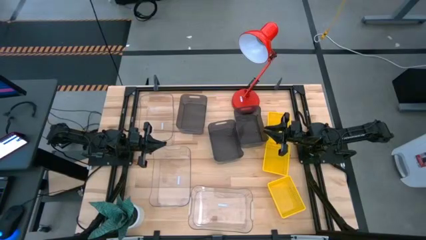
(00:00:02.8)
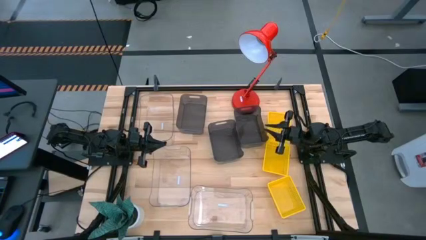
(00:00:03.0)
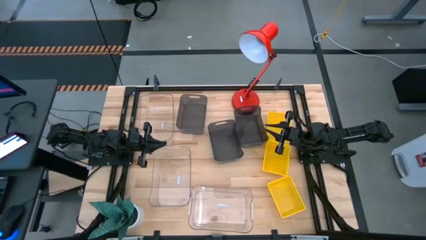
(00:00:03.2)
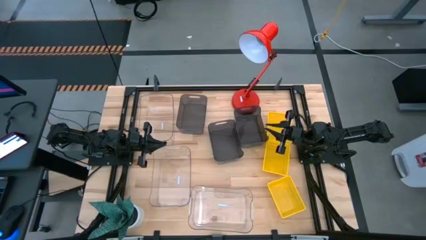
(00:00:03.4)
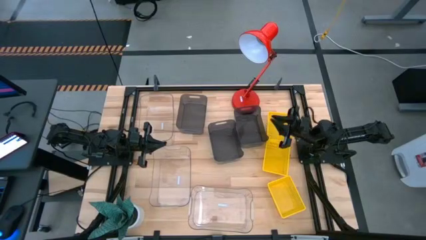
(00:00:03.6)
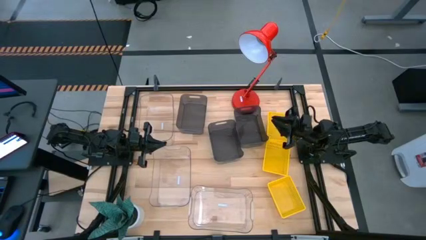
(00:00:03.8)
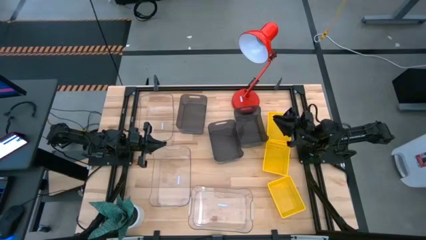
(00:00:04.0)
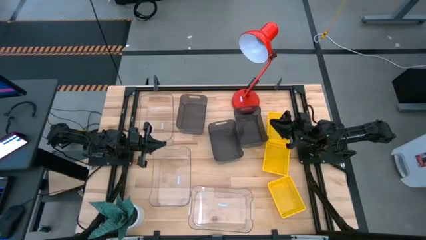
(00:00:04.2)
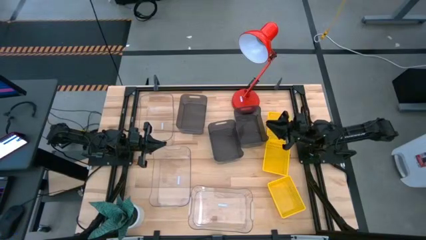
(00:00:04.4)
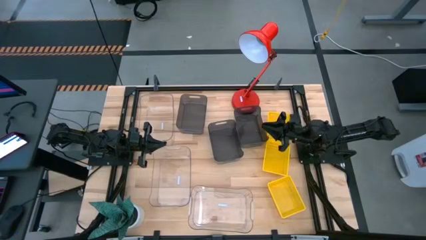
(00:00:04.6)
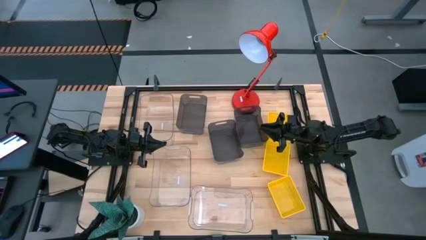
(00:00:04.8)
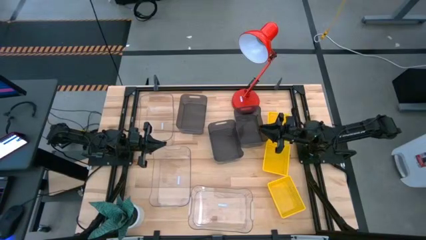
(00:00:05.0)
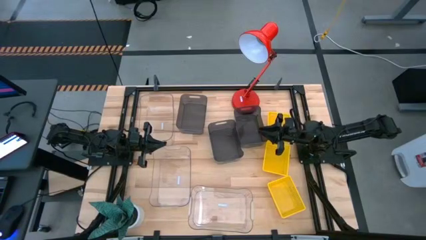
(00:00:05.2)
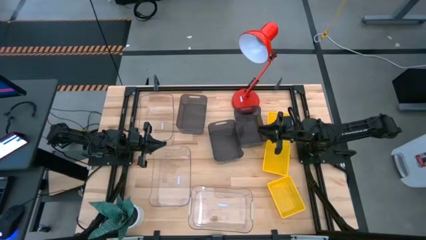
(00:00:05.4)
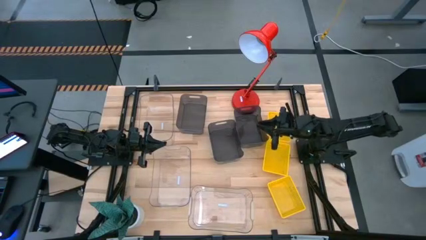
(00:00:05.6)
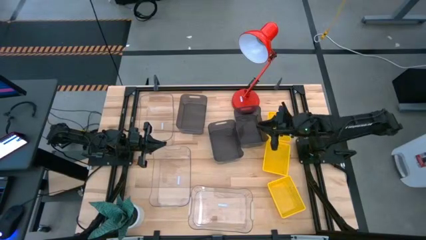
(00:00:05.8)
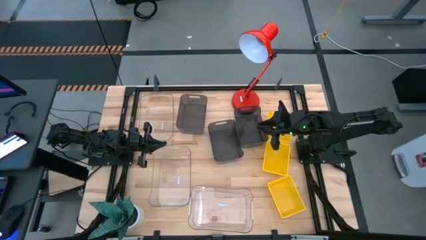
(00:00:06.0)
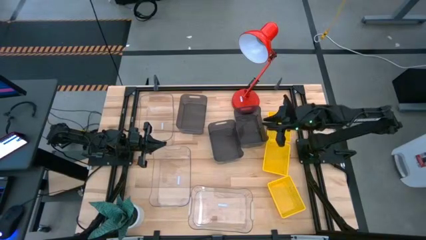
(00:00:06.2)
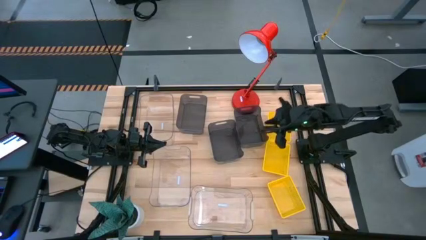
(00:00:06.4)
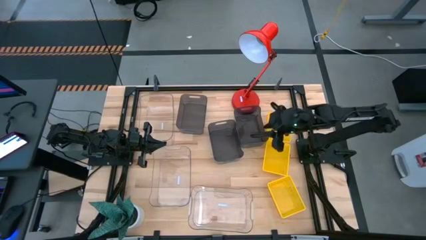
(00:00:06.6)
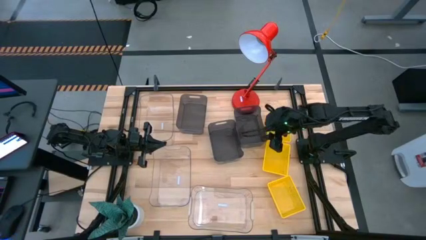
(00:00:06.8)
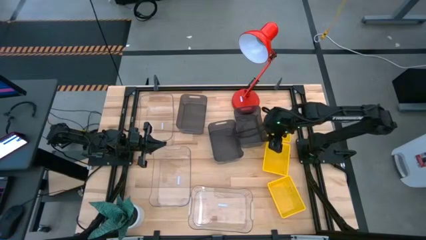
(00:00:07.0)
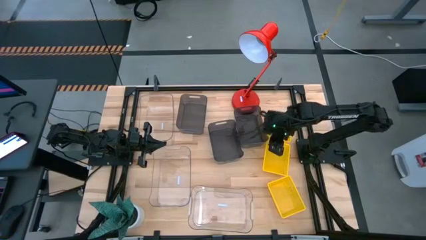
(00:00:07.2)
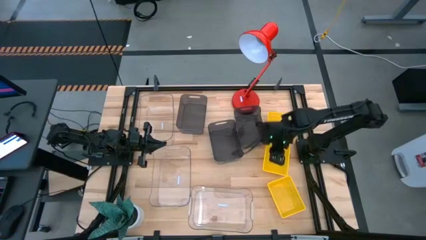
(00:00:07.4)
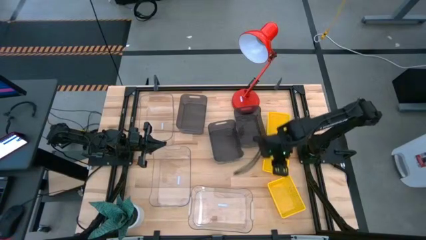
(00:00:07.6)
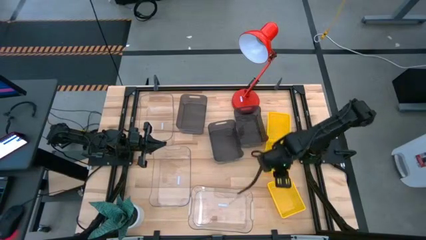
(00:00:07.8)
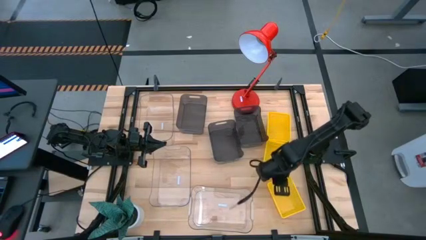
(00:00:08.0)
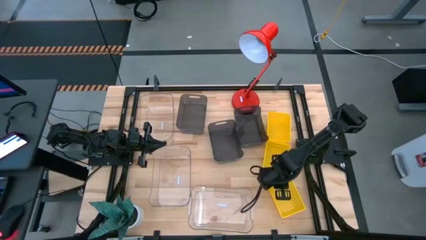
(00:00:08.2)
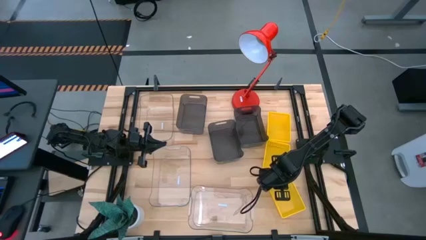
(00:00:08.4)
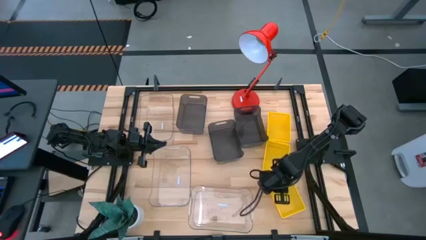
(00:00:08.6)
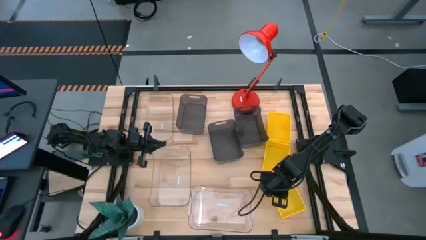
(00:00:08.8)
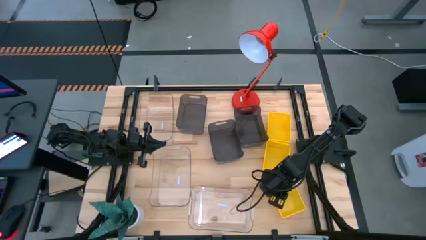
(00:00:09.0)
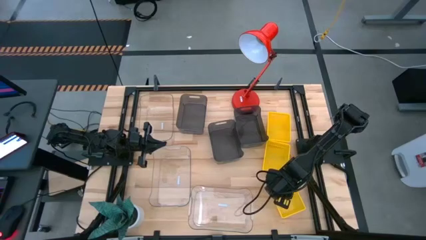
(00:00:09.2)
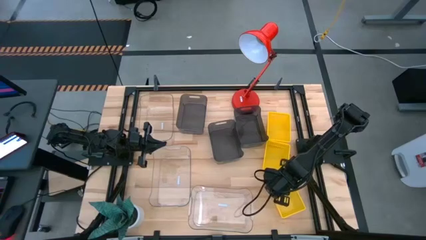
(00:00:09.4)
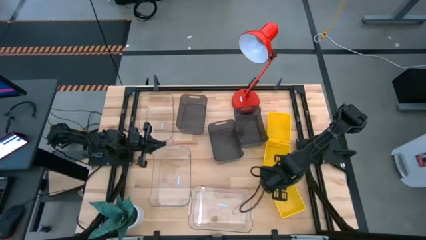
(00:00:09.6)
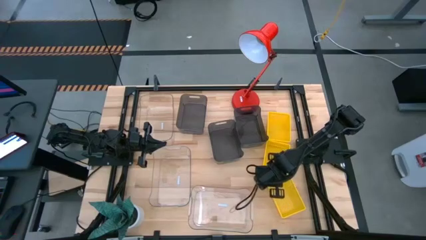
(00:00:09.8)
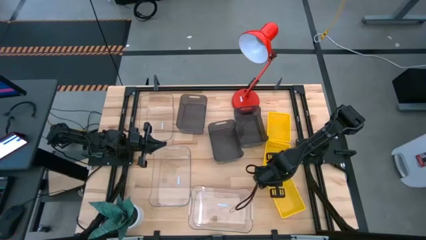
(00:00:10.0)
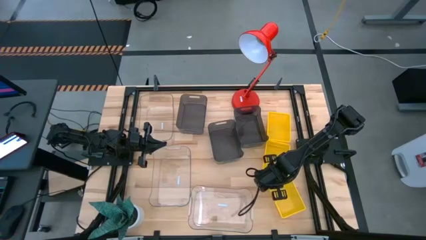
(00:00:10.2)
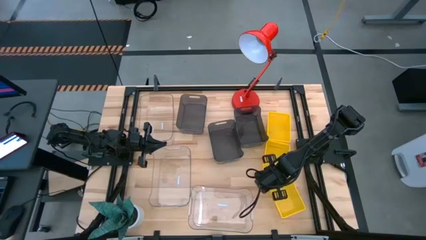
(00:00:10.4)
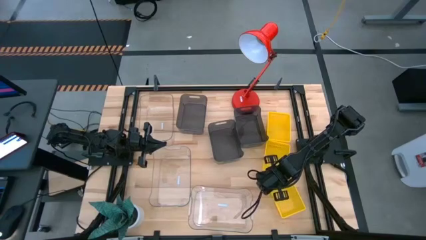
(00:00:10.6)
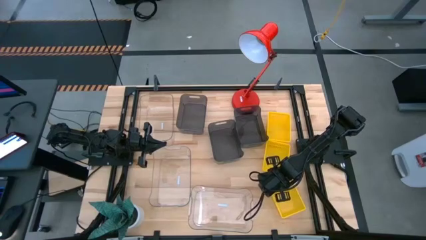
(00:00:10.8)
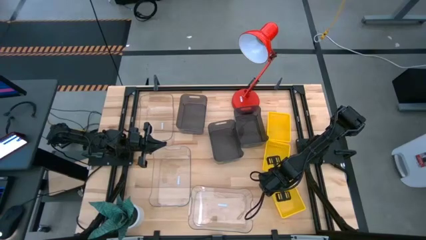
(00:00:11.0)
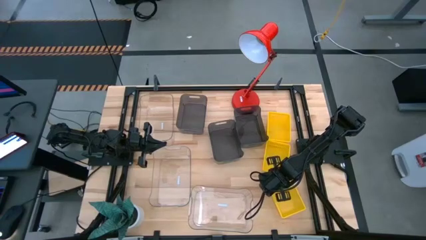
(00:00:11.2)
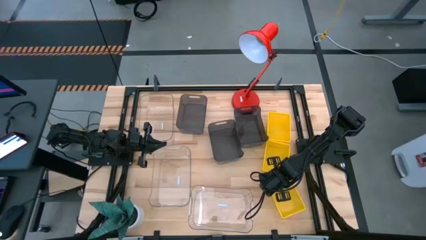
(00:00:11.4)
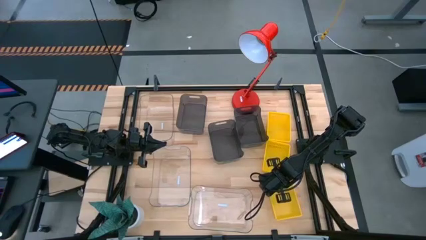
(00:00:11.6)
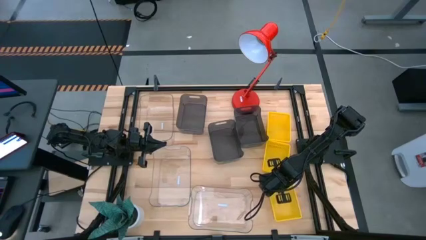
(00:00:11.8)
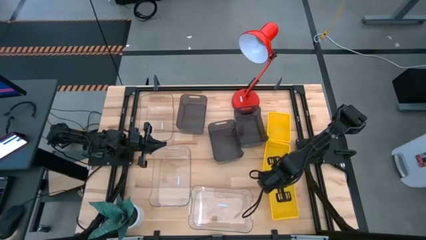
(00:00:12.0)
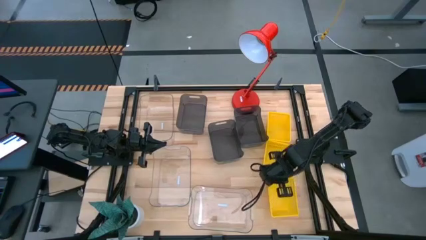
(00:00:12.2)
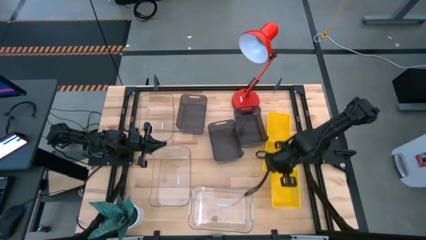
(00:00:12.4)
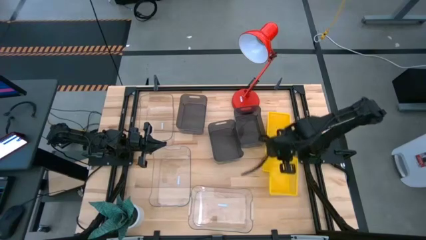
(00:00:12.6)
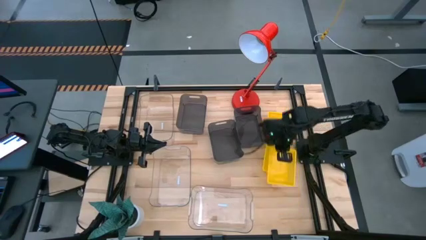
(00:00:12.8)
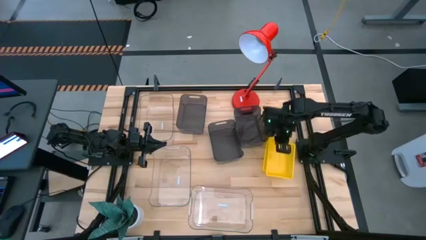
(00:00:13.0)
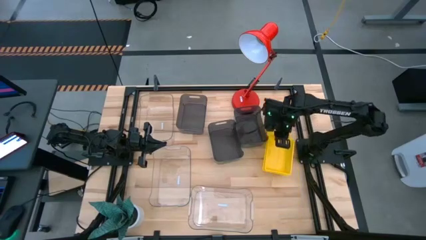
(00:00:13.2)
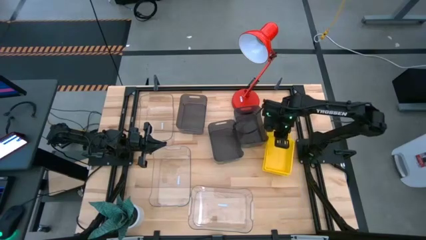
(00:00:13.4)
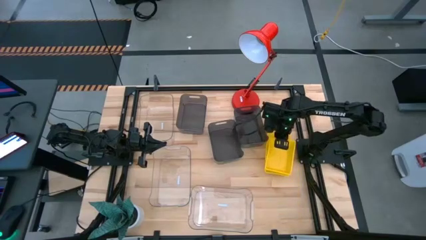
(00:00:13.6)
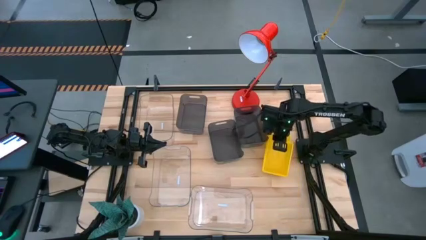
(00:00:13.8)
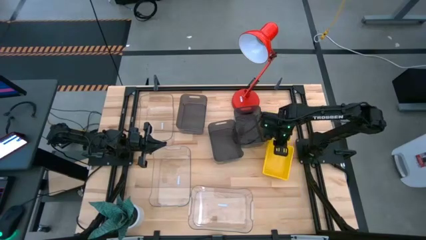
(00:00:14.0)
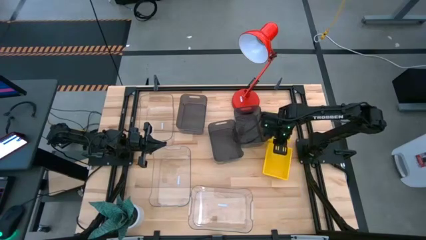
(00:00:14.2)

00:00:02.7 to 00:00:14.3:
Stack the bottom yellow bin on the middle yellow bin

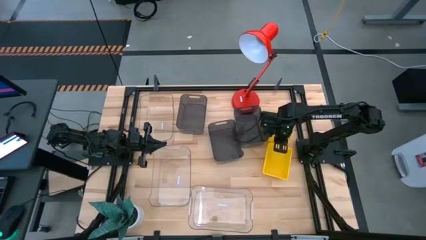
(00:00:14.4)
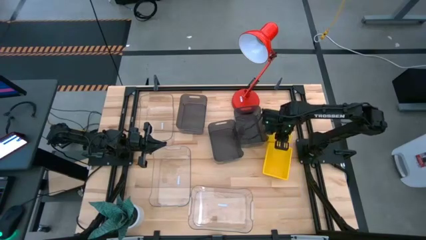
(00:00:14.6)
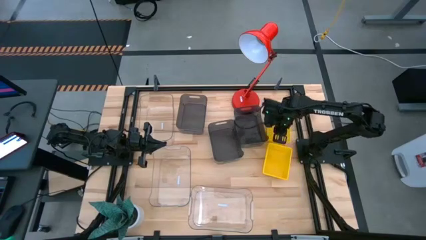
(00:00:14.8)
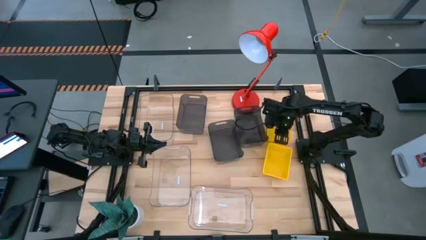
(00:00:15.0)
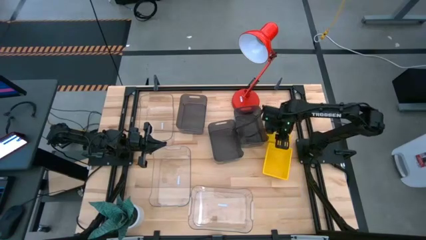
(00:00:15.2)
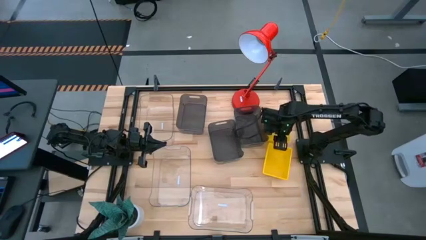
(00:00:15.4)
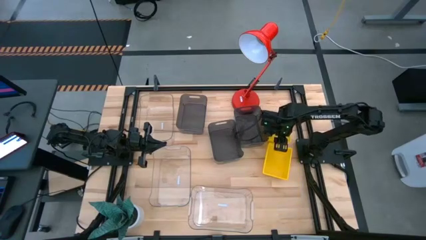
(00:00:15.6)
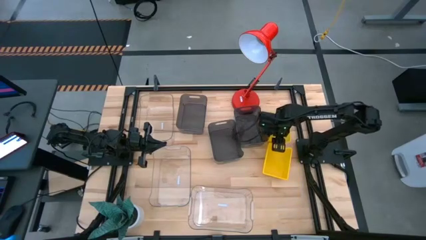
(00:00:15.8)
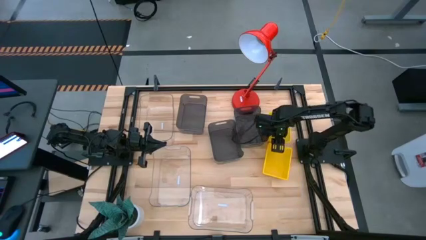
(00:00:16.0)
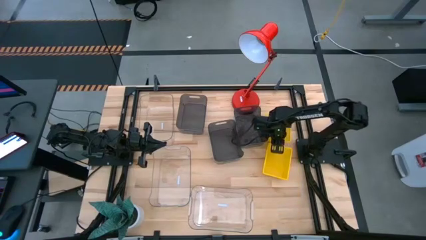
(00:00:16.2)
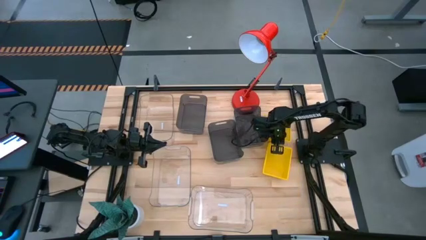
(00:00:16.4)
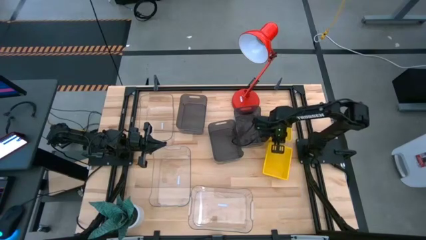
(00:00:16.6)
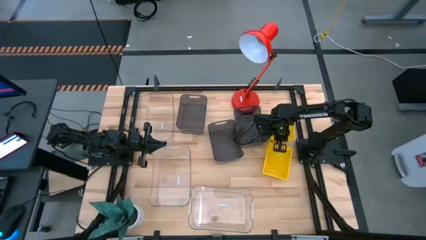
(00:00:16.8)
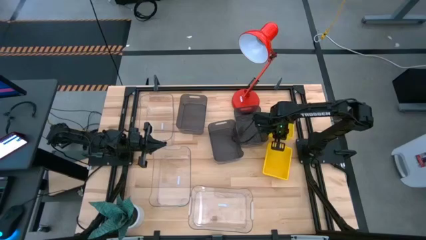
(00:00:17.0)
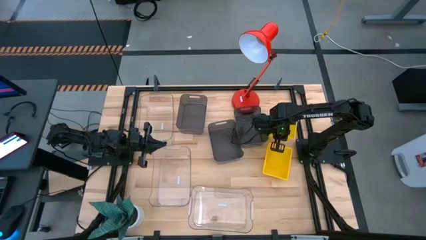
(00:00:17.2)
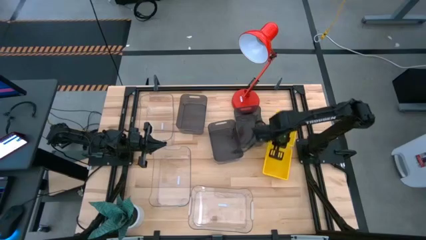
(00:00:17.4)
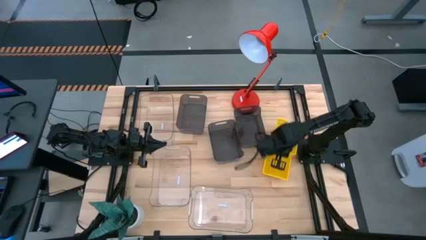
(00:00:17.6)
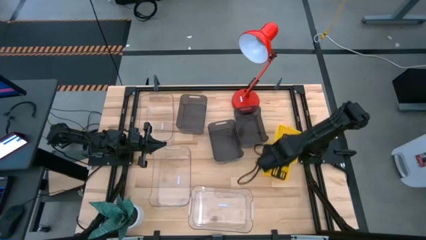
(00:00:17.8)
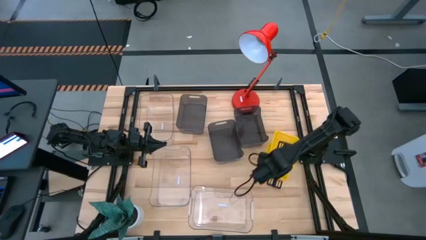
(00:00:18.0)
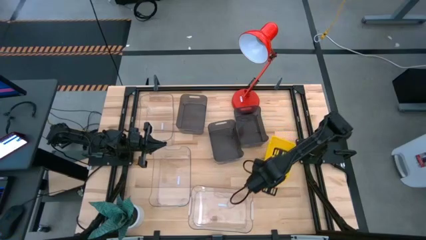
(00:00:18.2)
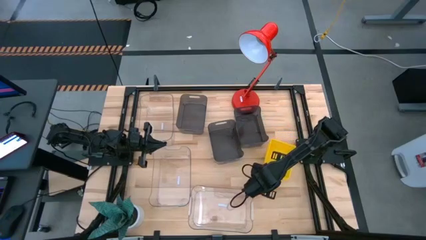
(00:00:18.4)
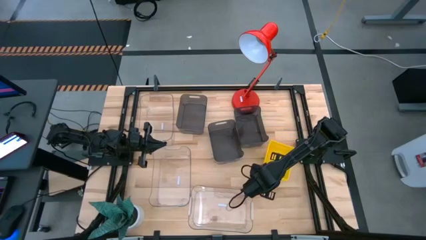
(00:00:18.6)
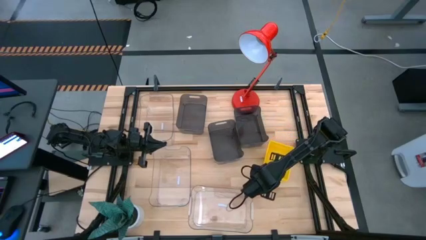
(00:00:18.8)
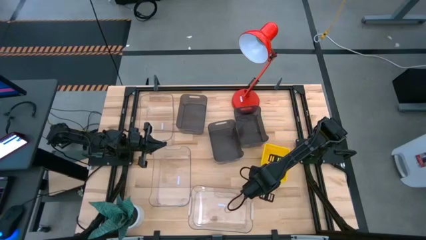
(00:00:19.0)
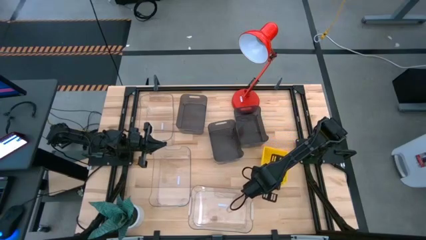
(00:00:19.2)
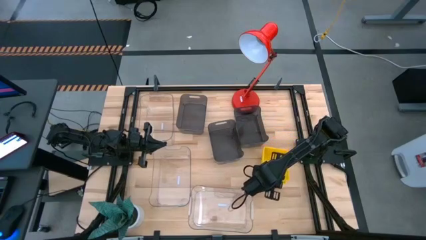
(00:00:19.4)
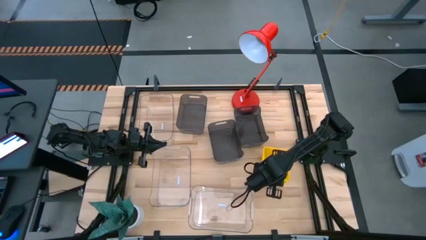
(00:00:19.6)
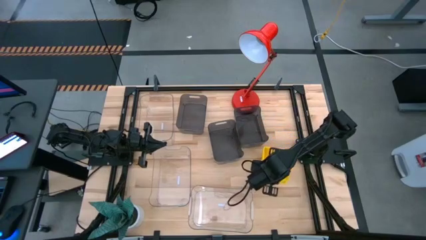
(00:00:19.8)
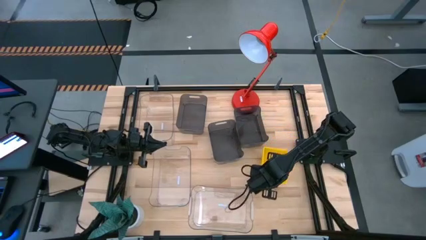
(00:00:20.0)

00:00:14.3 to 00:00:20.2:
Stack the top yellow bin on the bottom yellow bin
